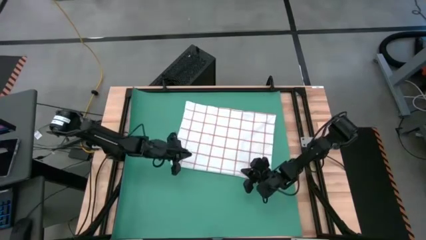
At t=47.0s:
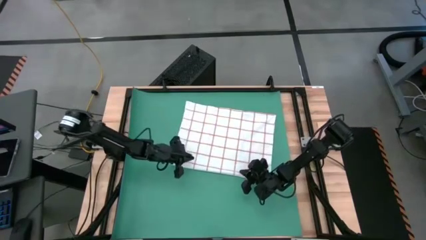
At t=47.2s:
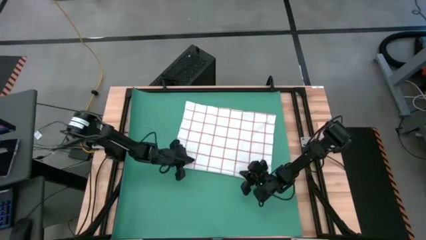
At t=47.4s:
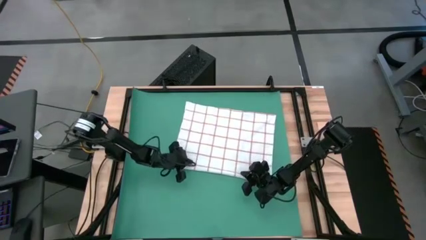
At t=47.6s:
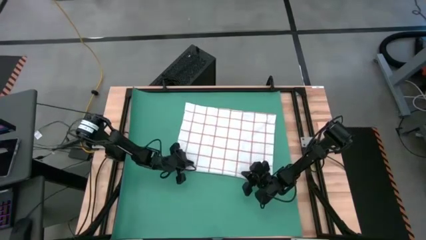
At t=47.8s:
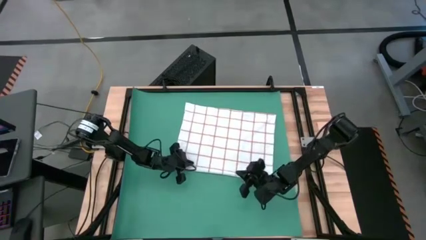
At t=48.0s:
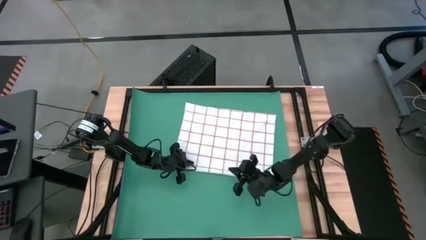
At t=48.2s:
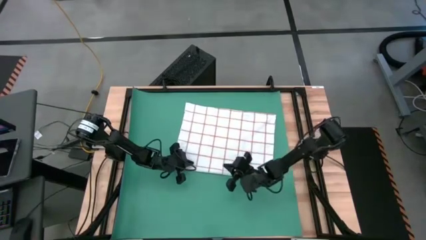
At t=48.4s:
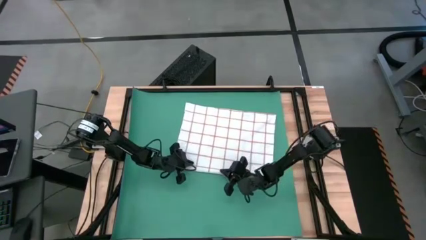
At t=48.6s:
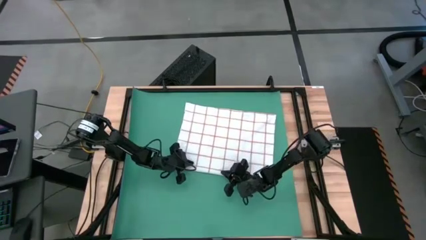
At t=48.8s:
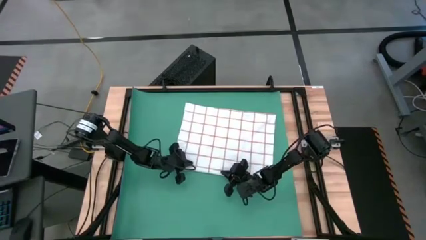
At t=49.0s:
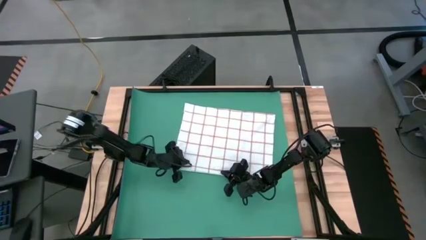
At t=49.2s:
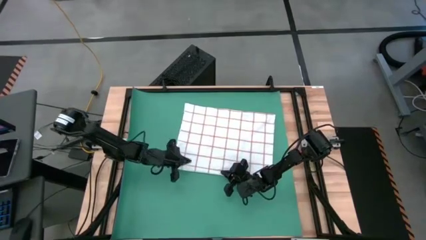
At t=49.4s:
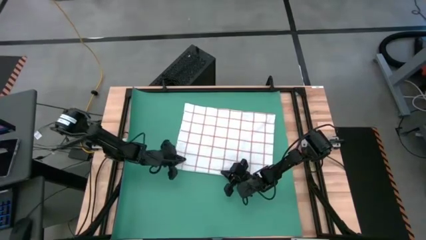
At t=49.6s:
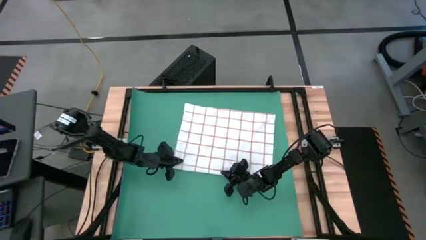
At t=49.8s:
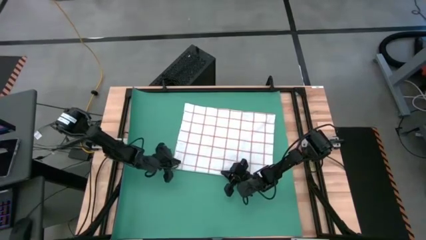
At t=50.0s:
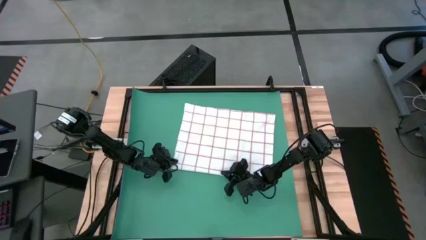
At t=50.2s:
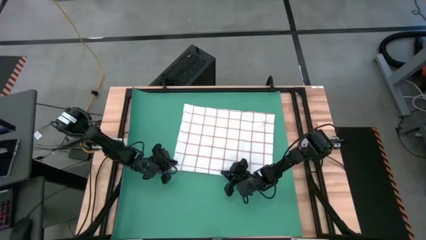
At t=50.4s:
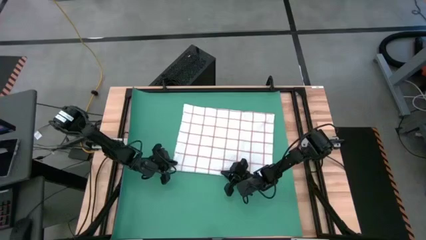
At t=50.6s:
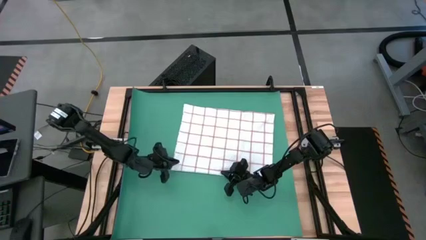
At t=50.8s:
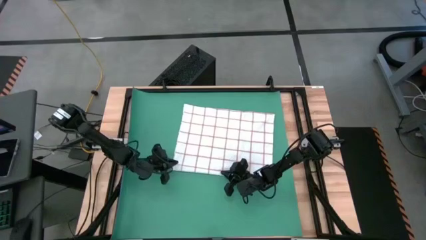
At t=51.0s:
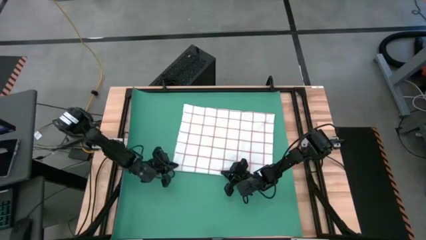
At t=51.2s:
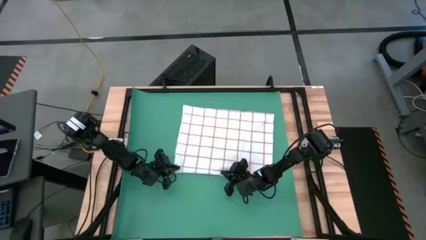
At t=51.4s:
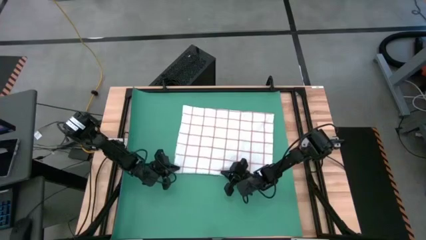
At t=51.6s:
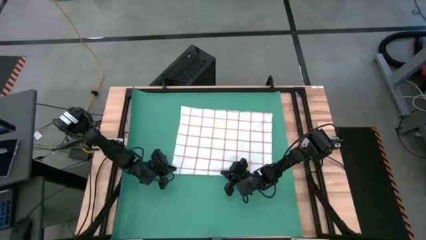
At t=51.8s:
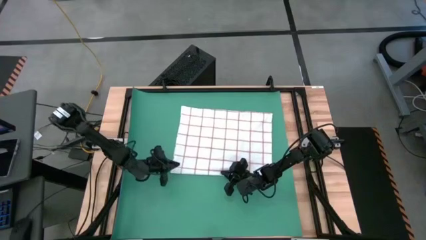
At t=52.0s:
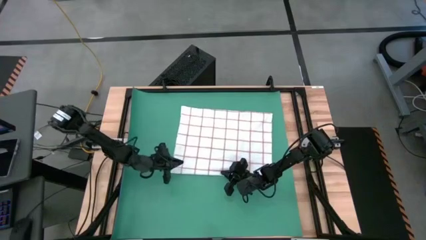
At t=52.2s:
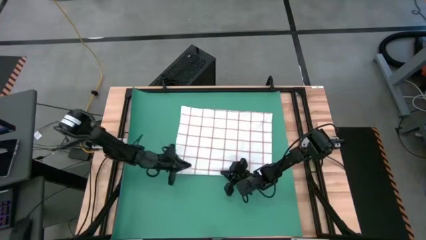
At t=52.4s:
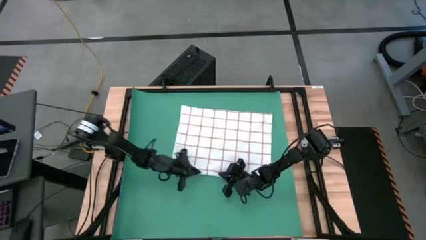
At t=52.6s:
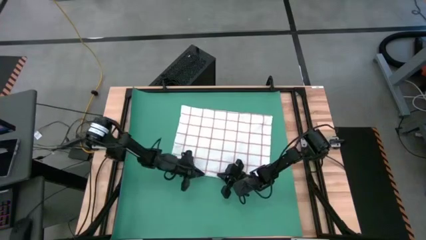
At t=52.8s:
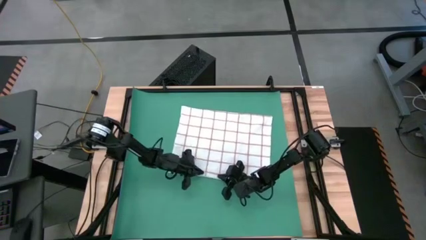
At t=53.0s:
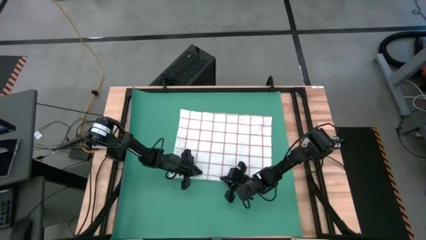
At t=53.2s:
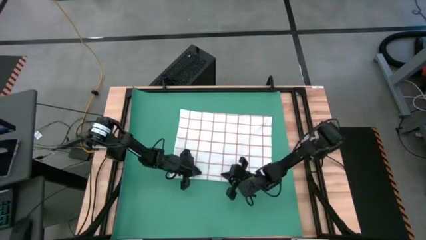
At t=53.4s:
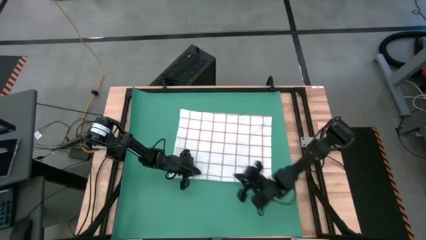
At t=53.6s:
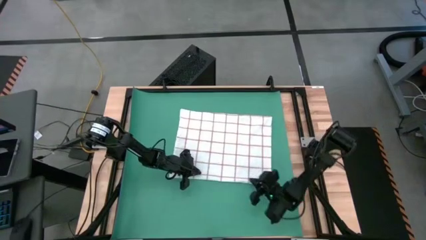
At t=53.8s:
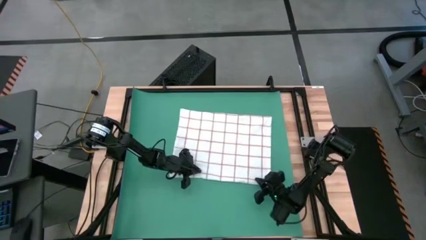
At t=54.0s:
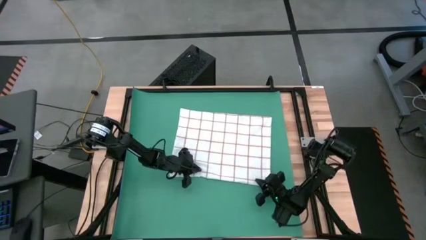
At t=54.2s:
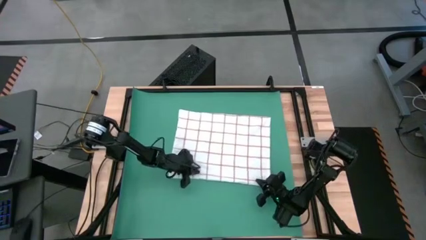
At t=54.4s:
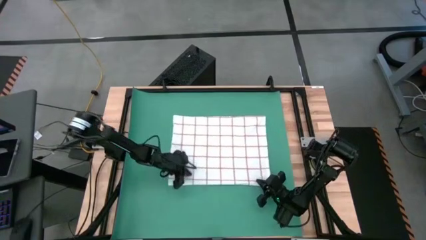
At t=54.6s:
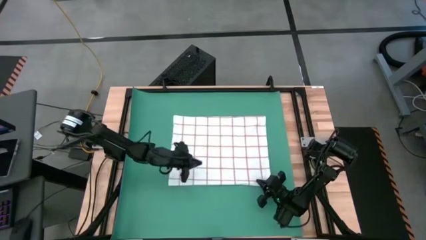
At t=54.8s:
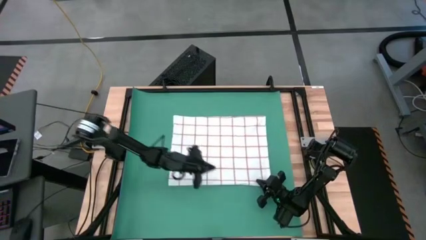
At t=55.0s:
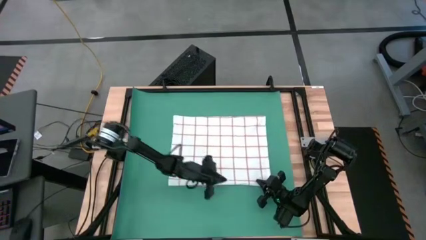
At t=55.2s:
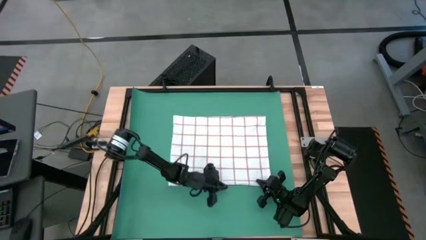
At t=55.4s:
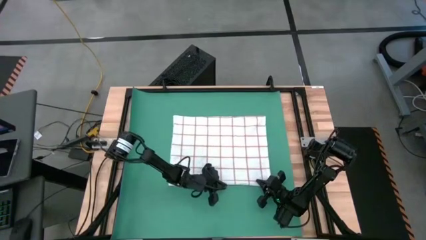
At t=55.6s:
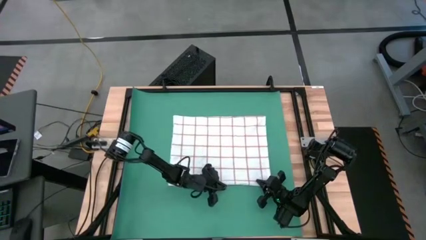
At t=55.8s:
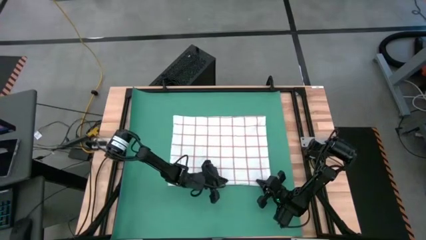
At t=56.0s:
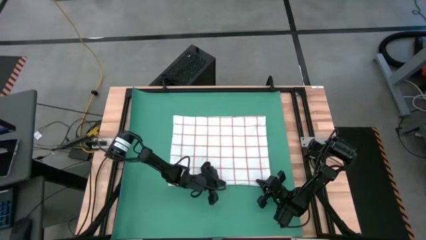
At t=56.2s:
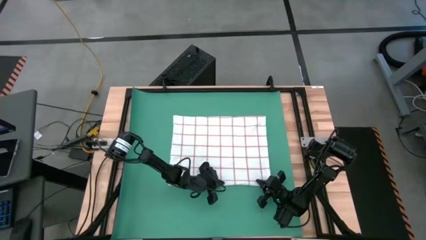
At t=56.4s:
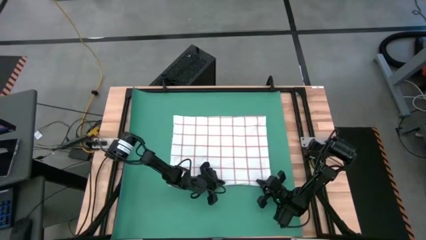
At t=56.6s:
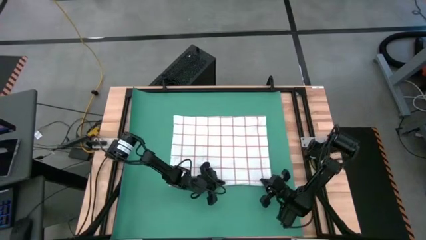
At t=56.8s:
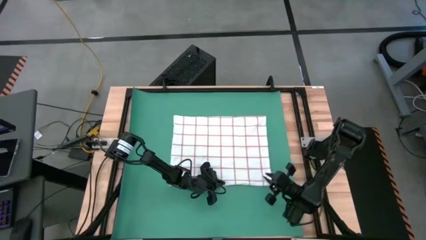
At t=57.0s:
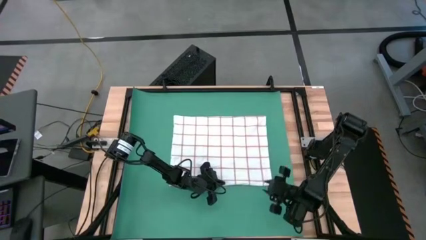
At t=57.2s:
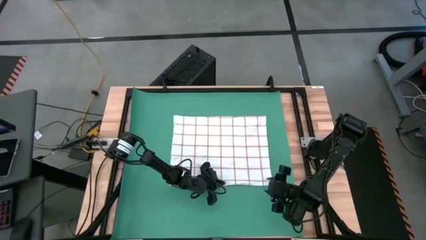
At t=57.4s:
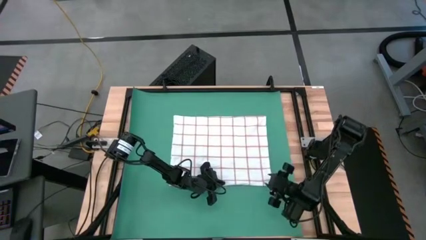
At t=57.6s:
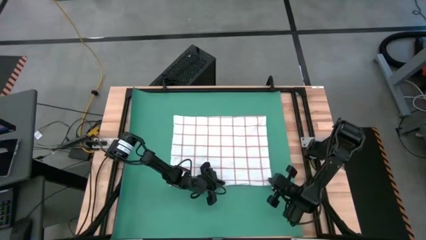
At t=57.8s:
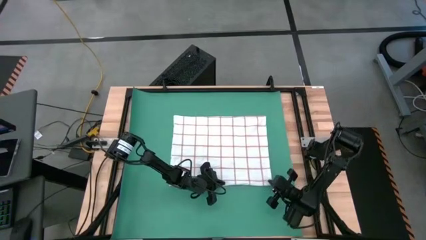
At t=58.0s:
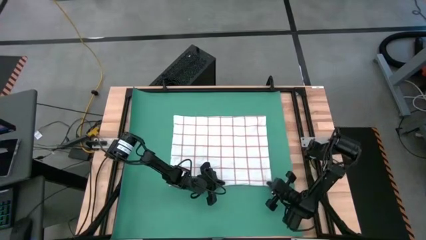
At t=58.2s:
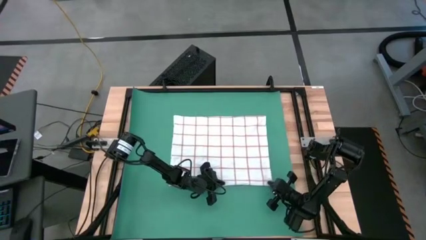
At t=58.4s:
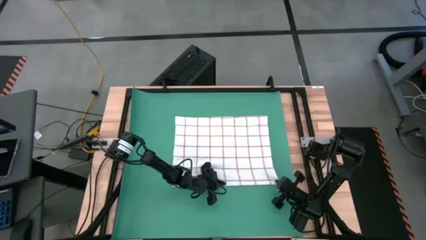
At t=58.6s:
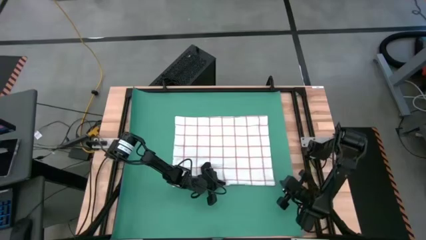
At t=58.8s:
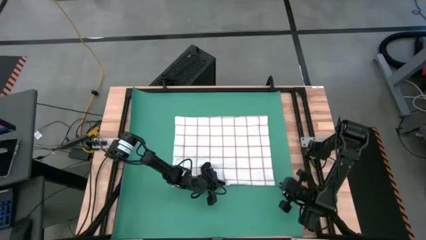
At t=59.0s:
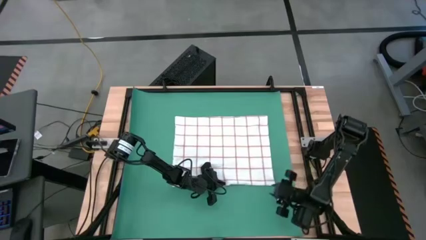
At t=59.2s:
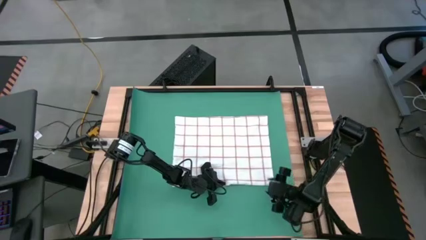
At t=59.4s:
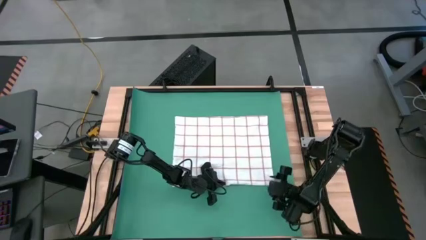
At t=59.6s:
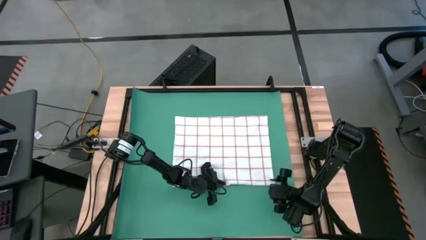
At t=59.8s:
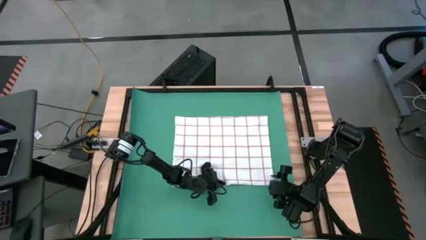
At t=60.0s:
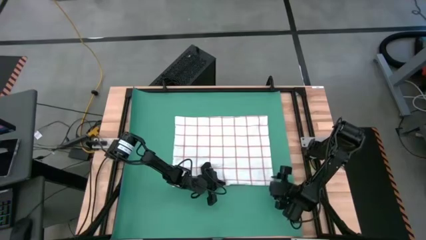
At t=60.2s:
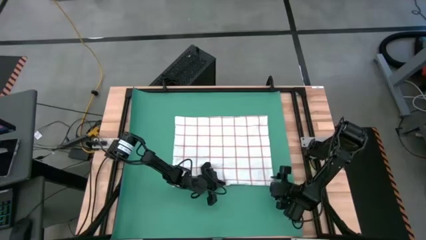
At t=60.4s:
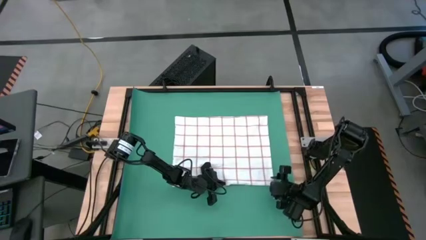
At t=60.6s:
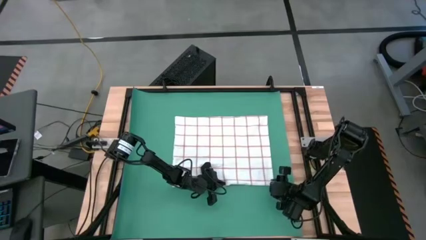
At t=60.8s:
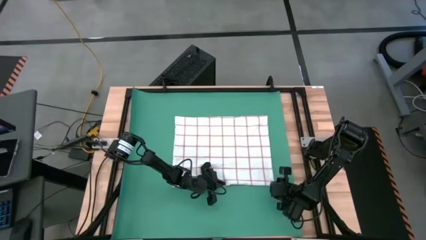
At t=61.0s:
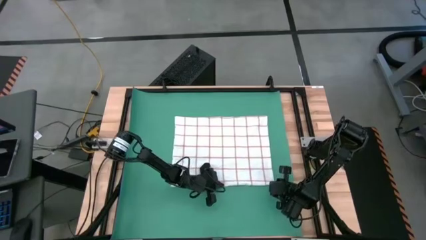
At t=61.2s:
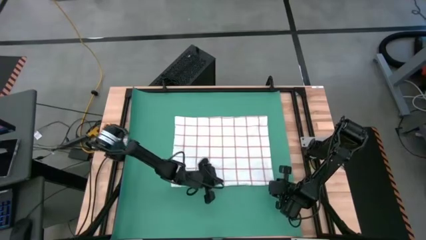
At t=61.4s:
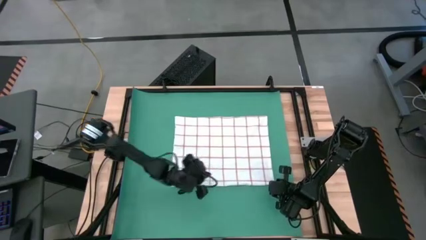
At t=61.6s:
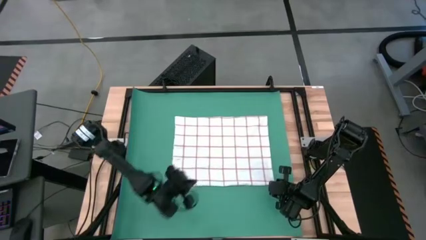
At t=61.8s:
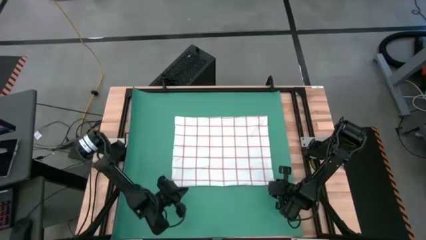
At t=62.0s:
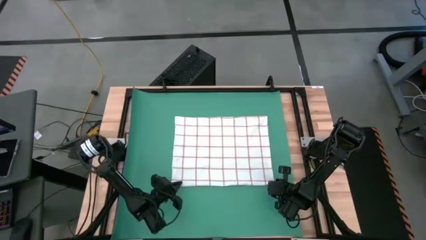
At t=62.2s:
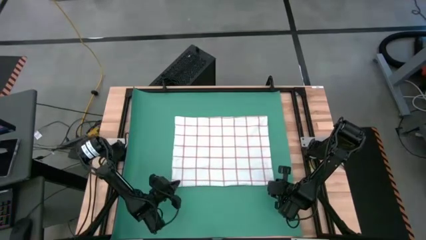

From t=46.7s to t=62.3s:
Task: Roll towel
Roll the white towel
